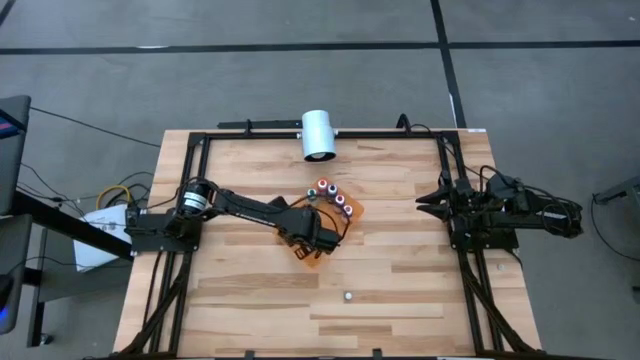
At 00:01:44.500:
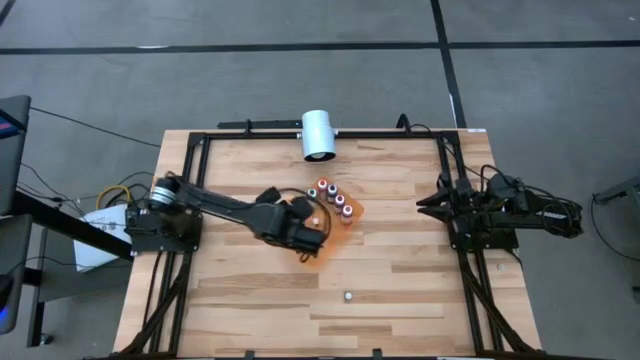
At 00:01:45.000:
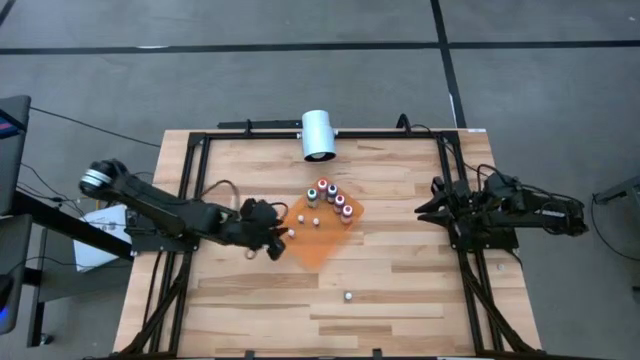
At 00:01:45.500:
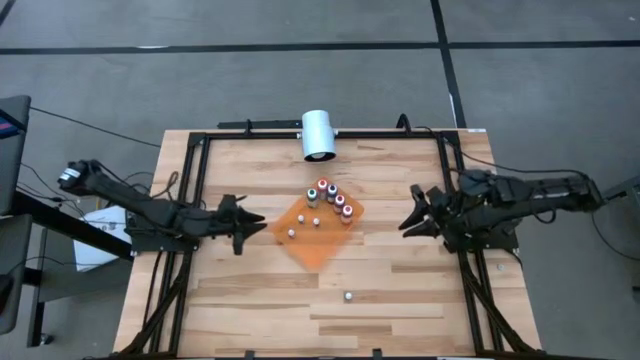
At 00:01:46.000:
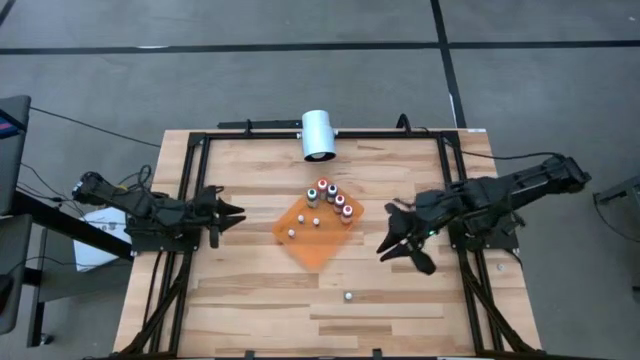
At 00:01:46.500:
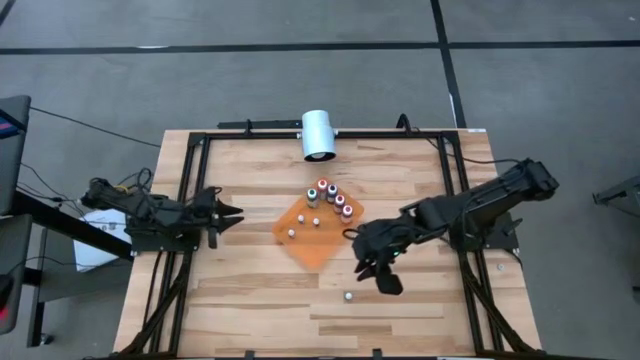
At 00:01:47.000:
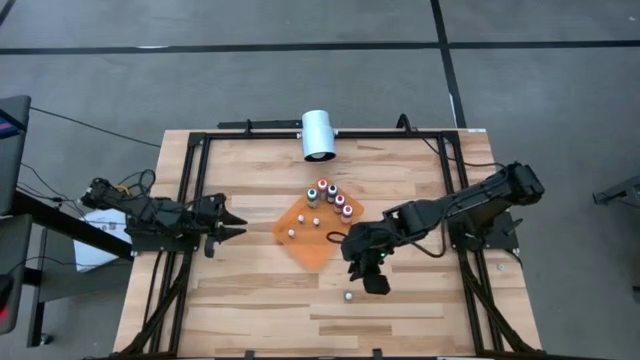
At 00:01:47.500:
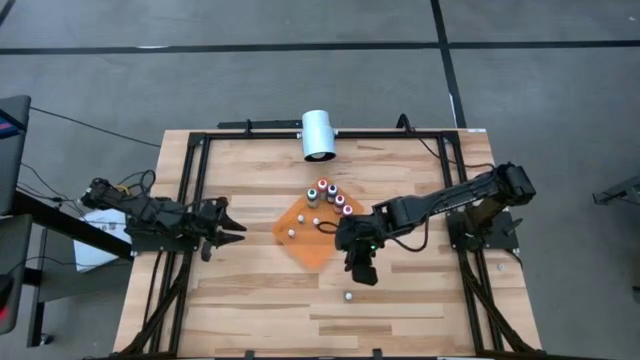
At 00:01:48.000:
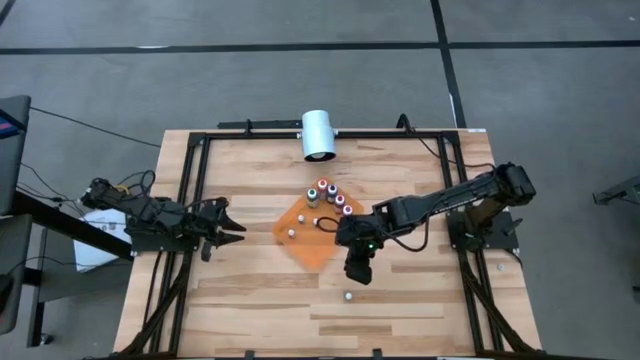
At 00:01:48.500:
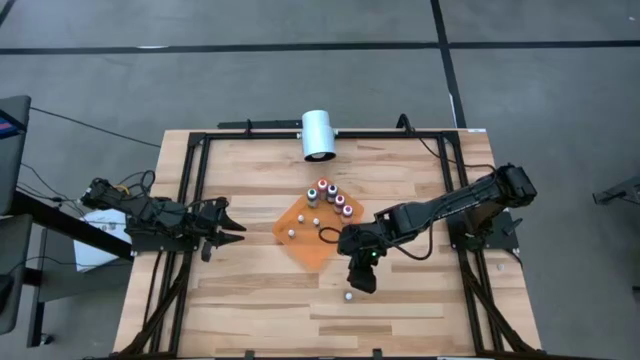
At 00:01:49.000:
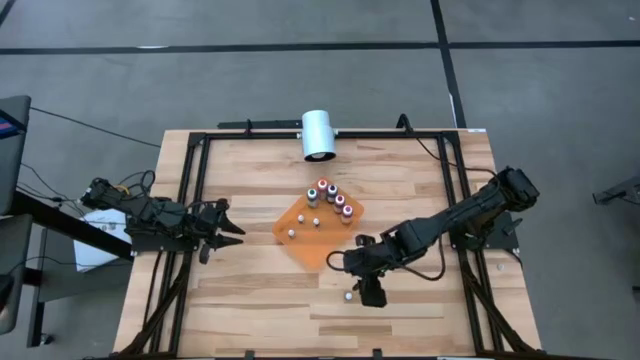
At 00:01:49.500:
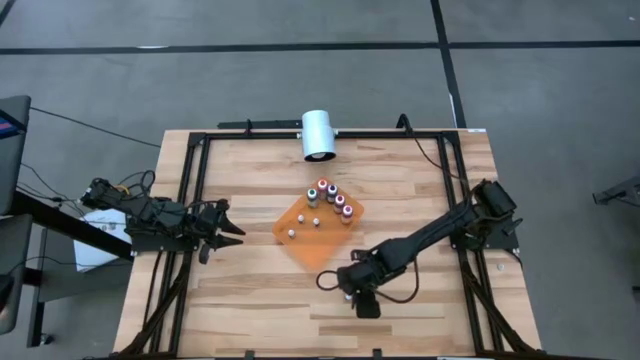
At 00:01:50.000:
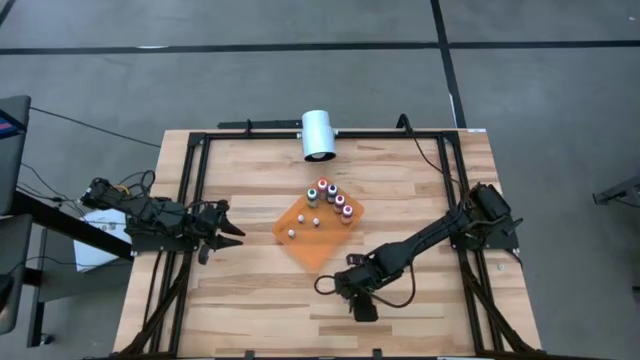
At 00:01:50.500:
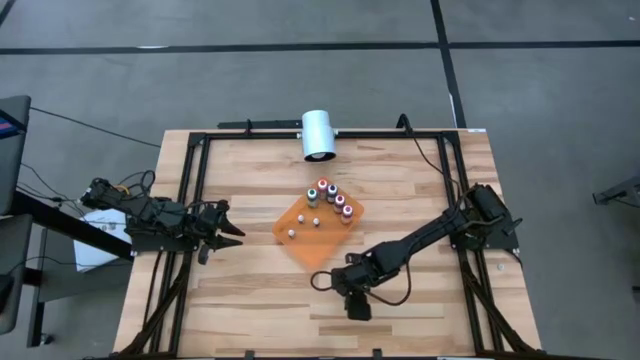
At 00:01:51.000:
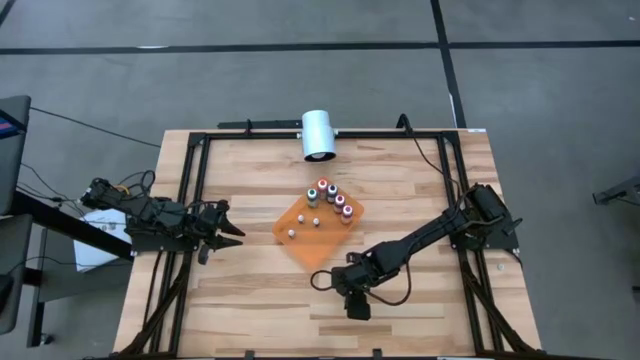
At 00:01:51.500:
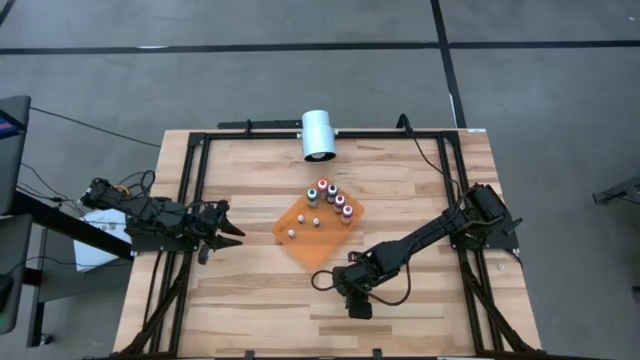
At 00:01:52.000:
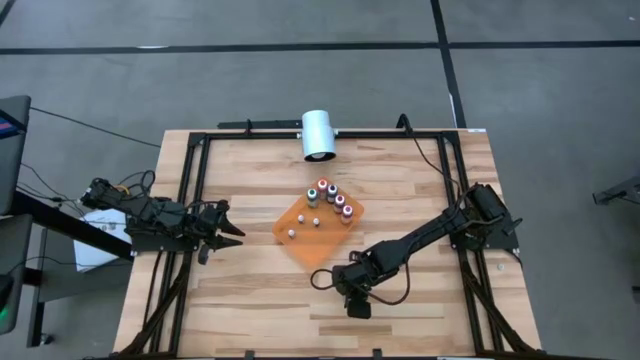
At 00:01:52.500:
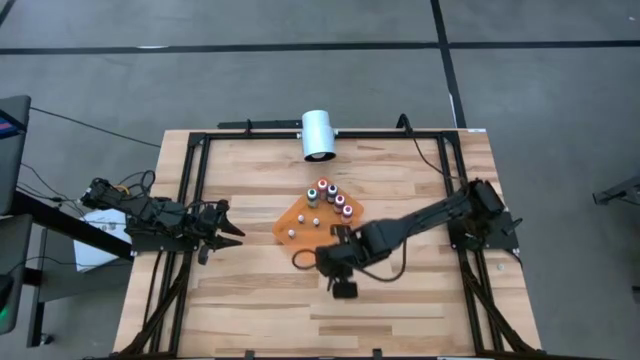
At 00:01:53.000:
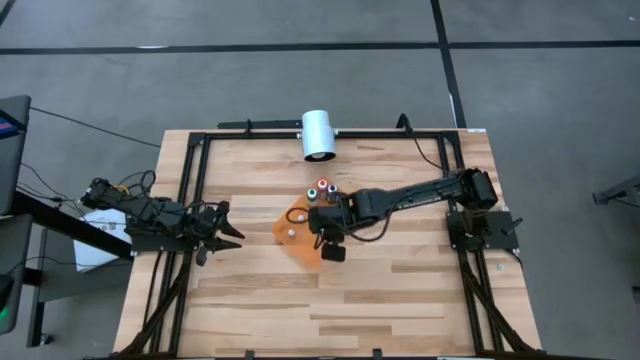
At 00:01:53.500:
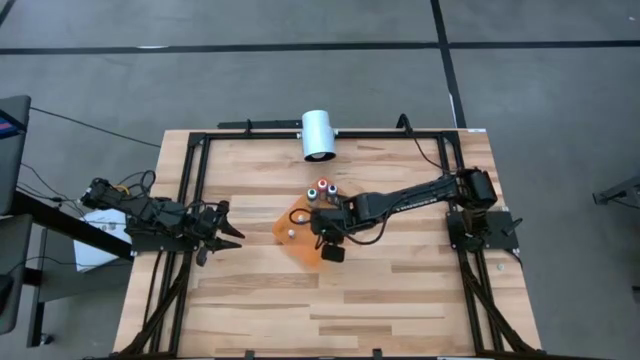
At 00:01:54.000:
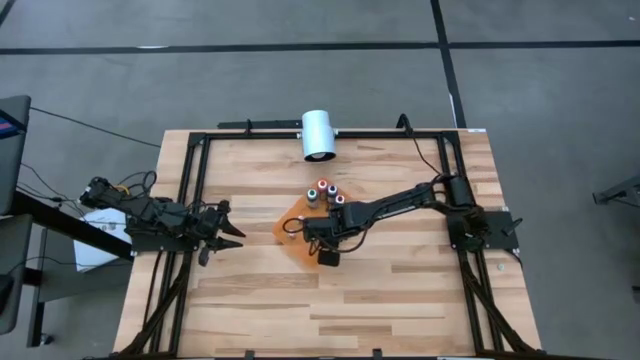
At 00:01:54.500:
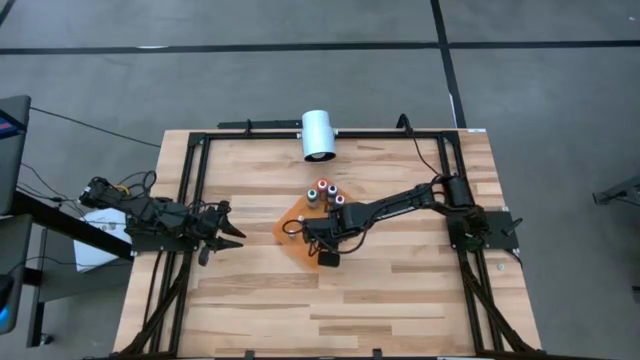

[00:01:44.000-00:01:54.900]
Task: Pick & Place food coloring
Put the small green food coloring bottle into the orange bin

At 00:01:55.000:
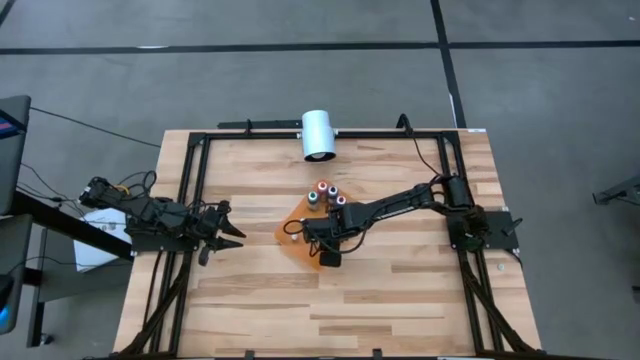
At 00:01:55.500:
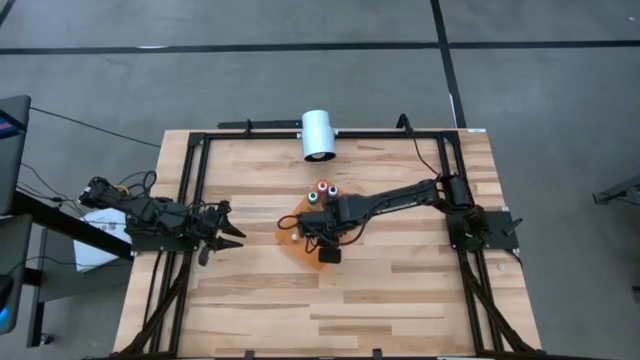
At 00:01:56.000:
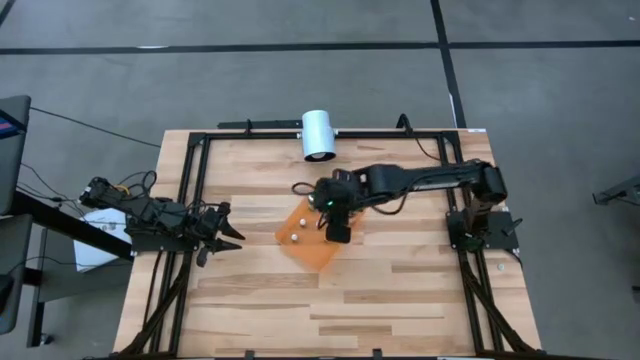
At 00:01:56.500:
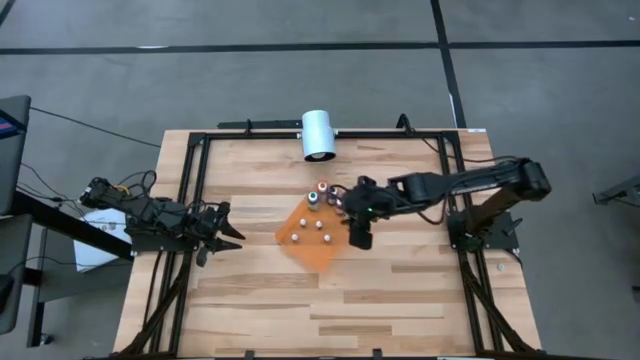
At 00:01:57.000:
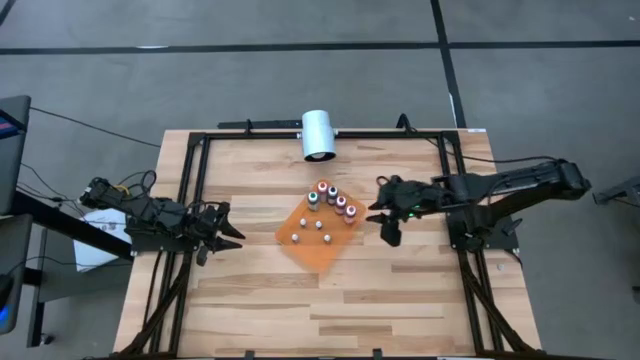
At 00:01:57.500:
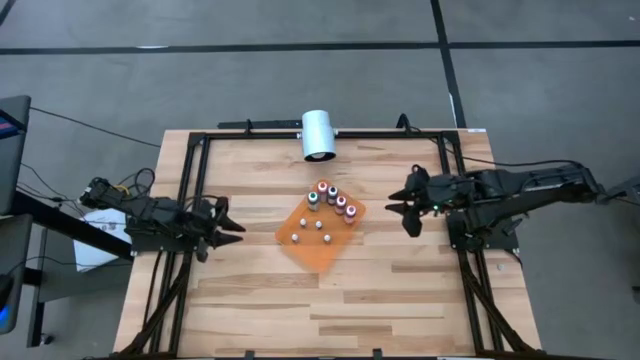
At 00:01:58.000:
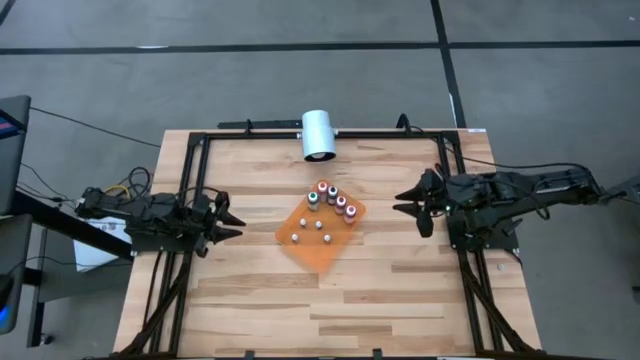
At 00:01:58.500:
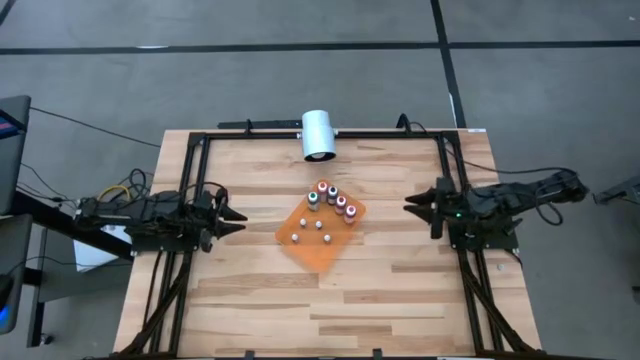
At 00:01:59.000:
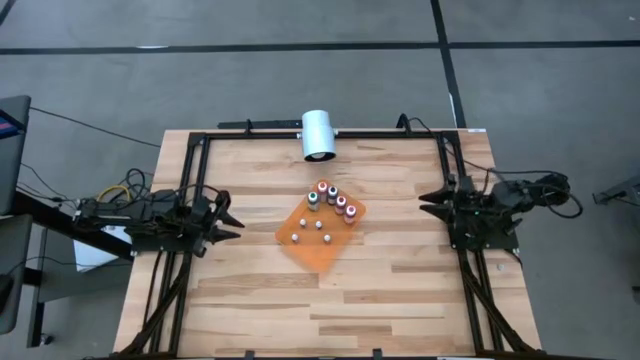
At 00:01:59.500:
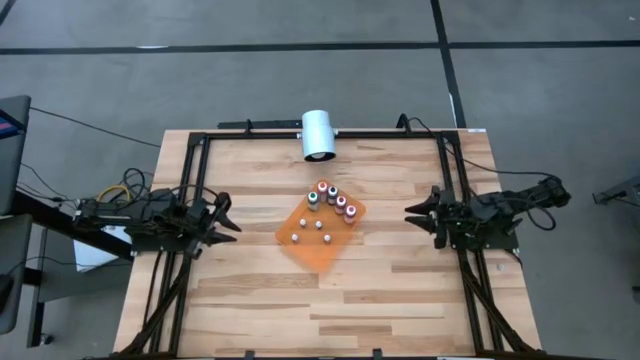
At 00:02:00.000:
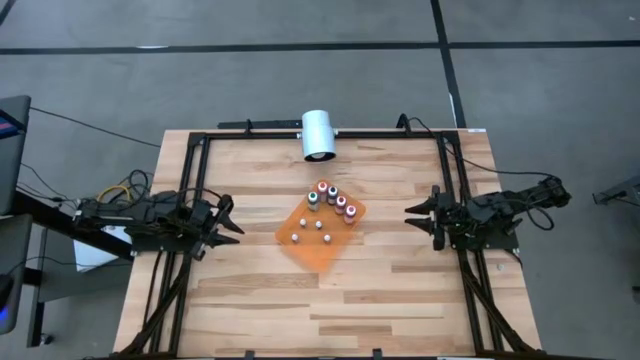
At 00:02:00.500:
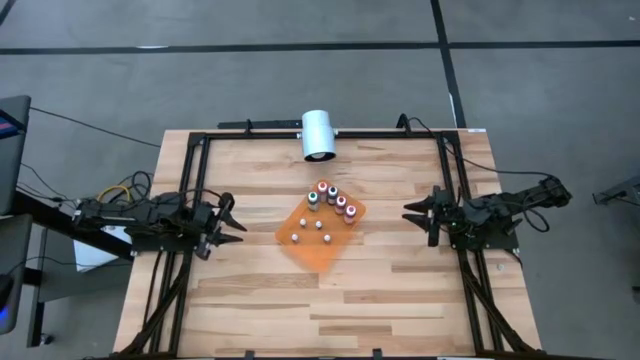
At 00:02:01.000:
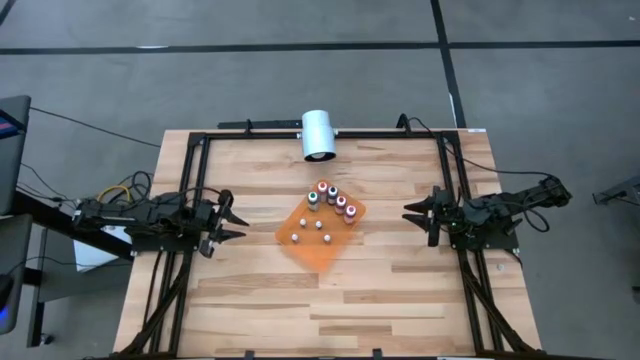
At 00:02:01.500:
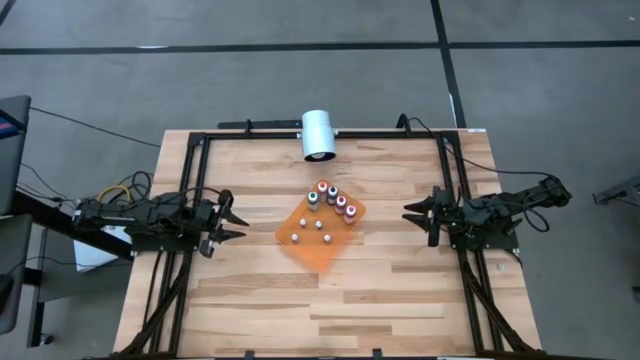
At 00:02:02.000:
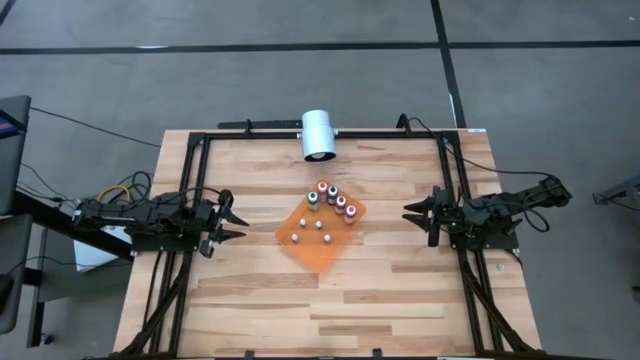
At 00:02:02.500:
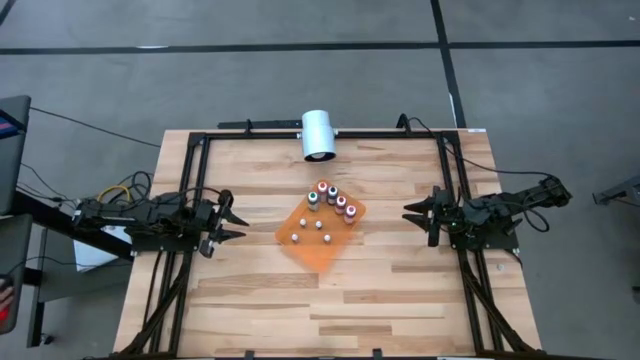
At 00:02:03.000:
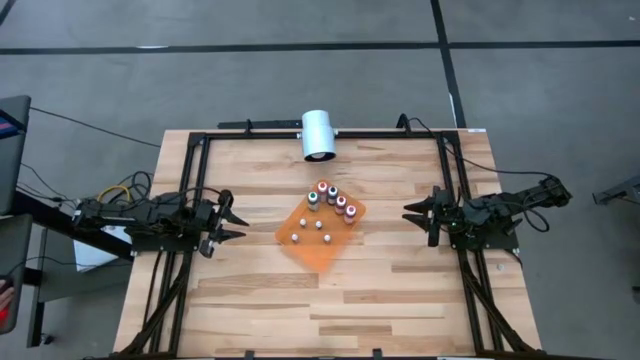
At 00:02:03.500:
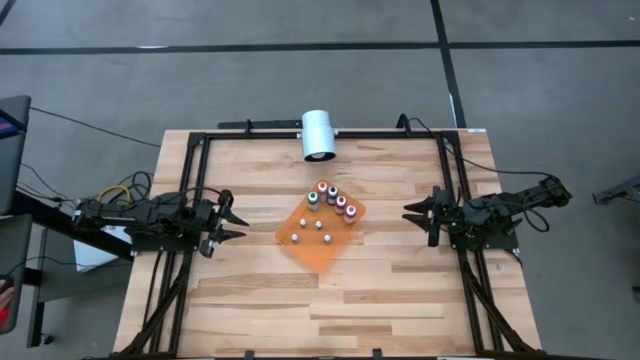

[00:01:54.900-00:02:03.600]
Return to Home Position
